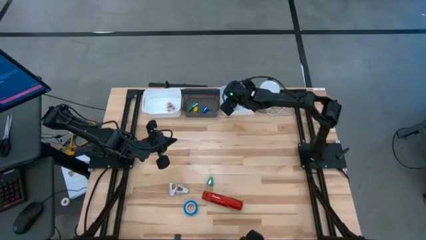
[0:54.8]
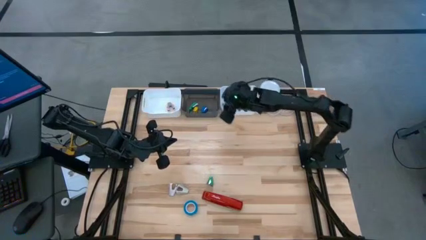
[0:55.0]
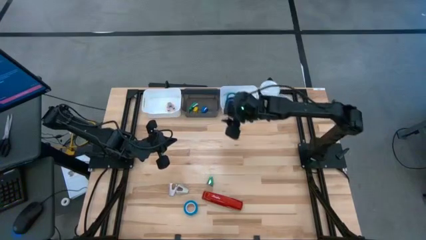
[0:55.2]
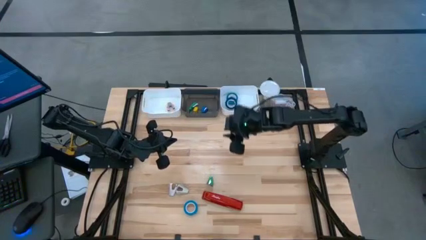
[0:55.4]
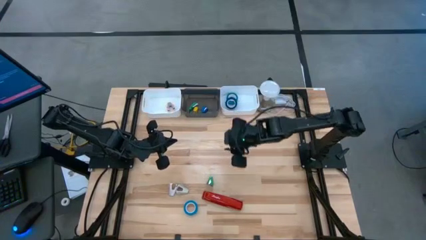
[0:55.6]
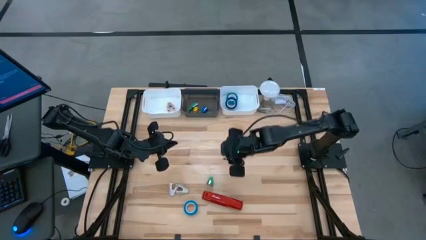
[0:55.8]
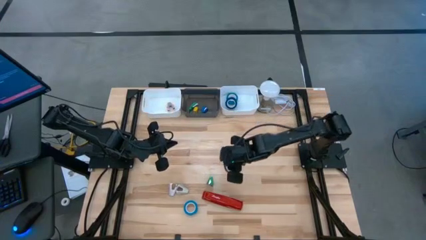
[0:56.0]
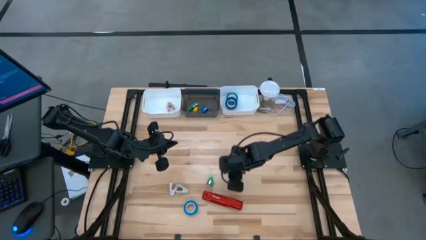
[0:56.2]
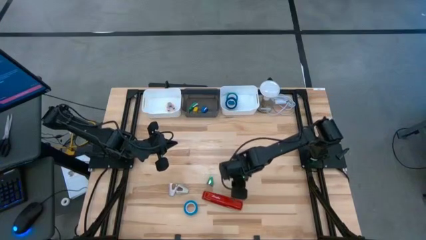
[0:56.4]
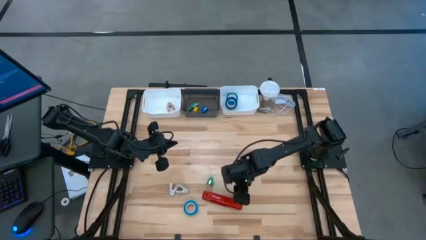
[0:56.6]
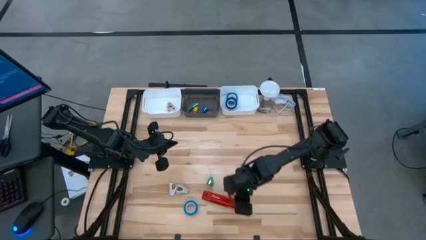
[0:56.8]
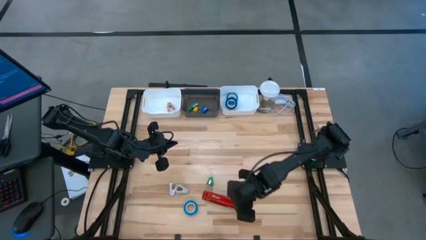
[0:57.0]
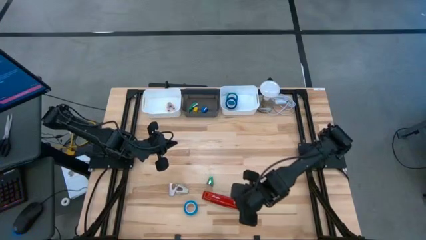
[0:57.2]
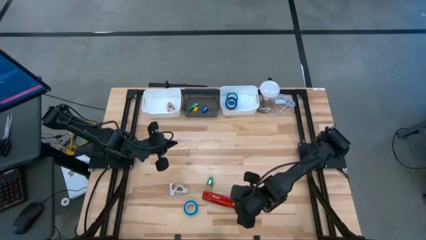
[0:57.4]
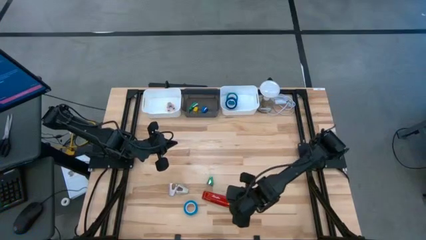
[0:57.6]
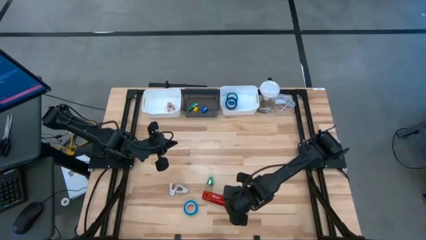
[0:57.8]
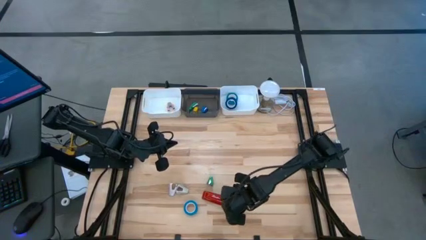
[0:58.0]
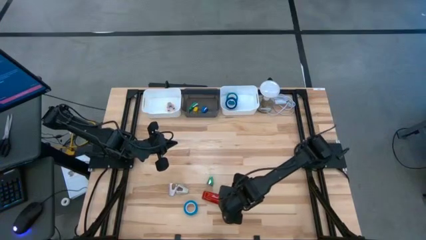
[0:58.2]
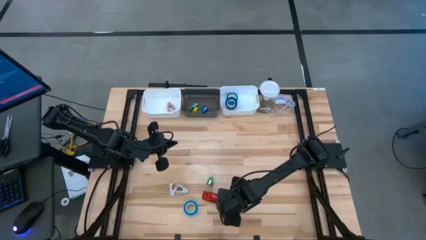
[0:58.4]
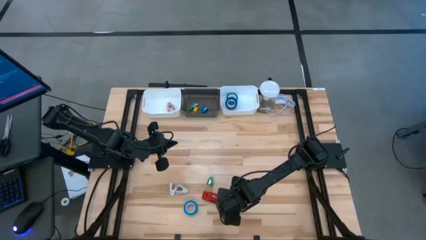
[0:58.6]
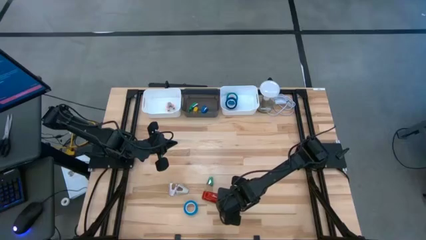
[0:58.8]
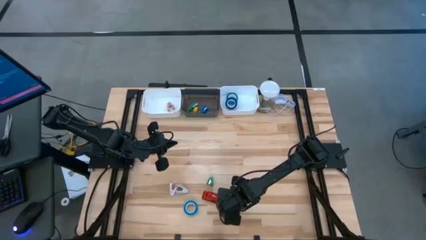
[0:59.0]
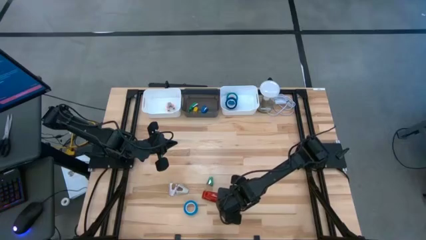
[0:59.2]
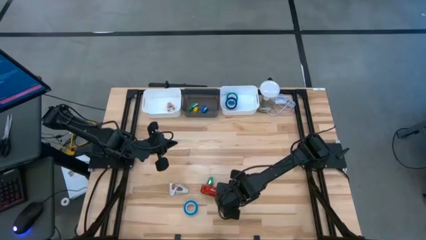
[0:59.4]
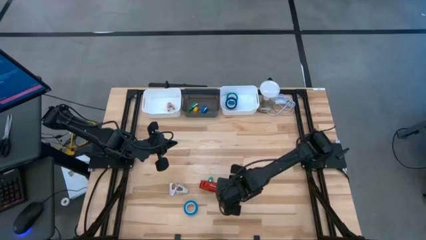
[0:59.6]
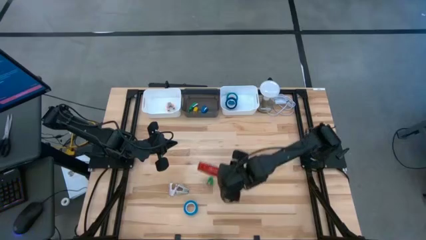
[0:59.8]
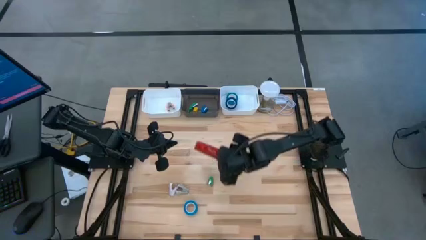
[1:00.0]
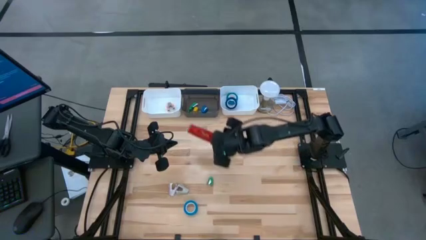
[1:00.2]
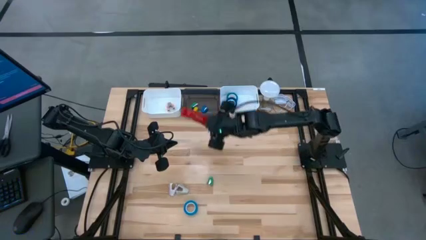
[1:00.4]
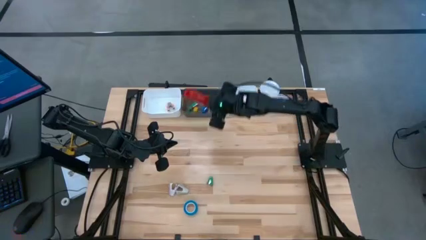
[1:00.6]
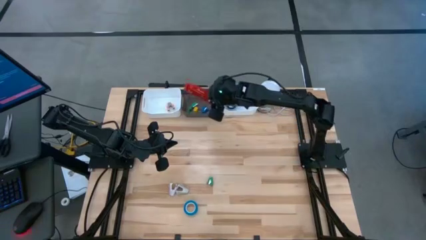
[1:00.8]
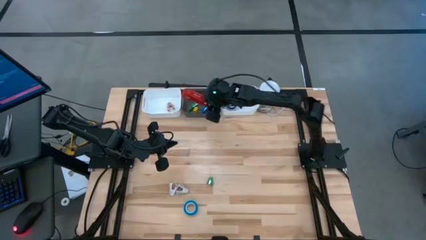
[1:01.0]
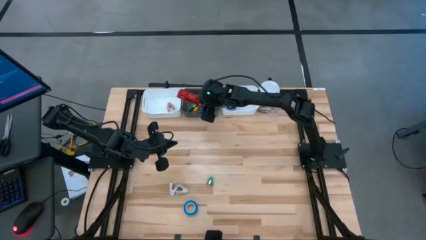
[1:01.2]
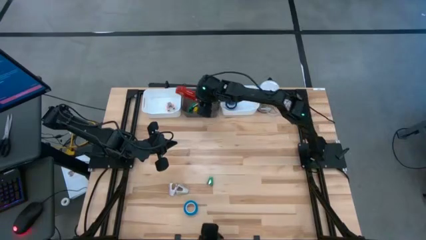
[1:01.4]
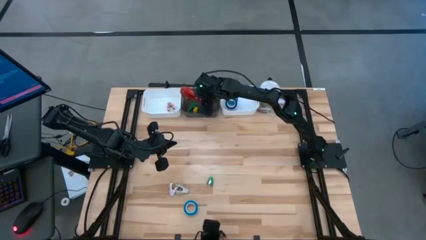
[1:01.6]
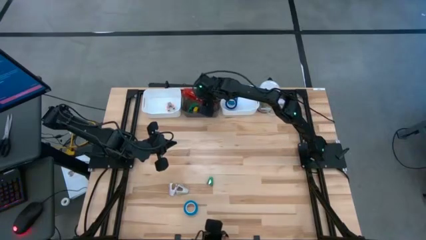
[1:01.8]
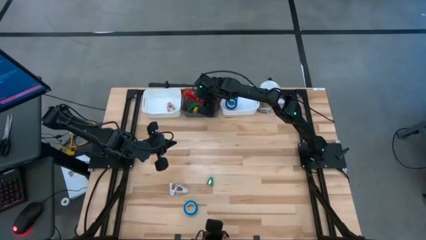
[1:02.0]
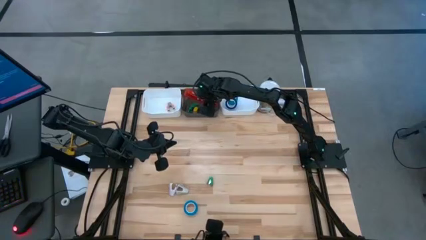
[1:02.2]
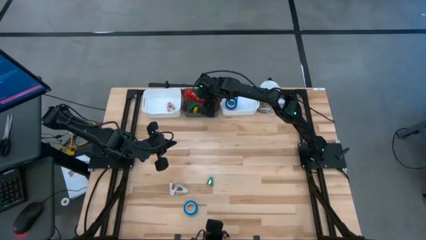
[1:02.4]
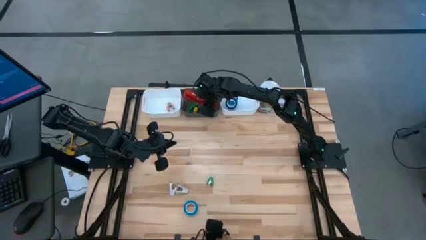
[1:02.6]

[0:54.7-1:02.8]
Task: Pick and place Stapler, Stapler remover, tape
Put the red stapler into the black bin

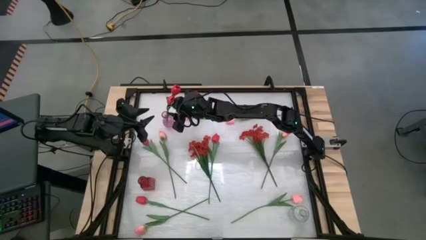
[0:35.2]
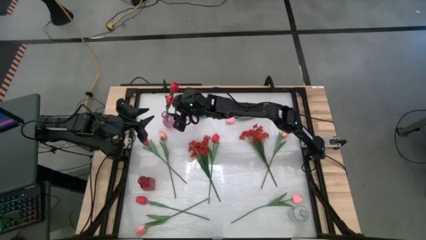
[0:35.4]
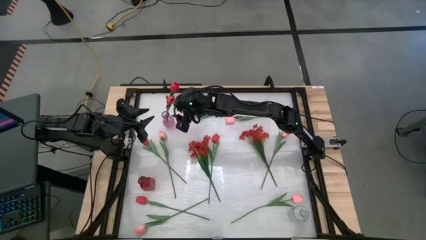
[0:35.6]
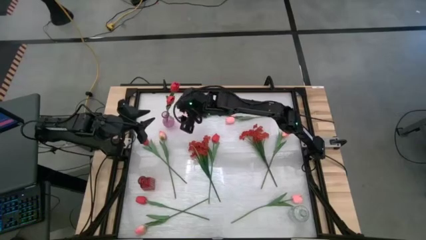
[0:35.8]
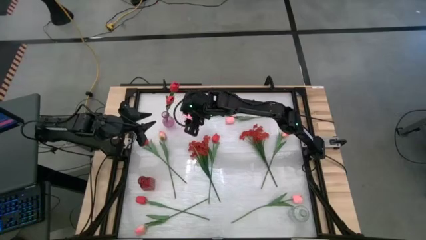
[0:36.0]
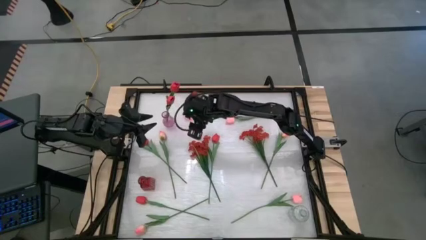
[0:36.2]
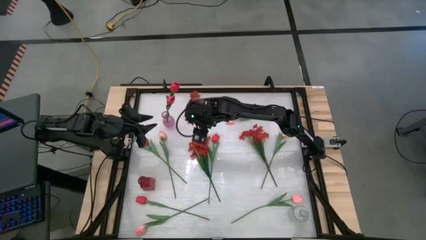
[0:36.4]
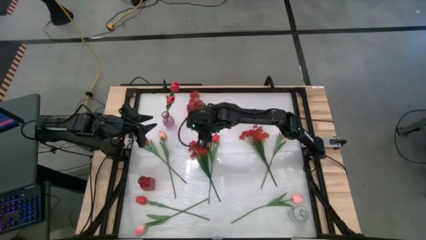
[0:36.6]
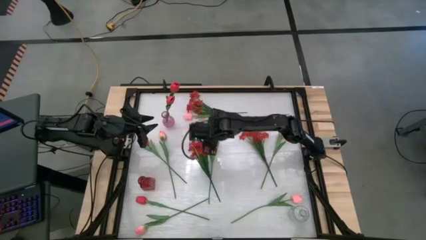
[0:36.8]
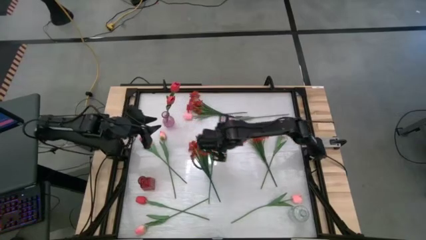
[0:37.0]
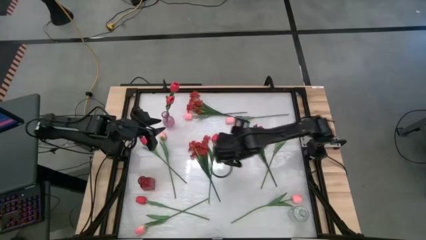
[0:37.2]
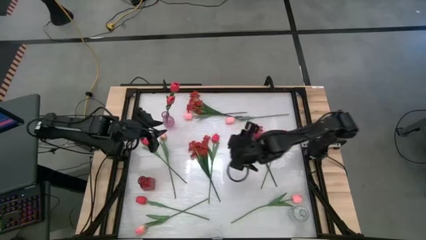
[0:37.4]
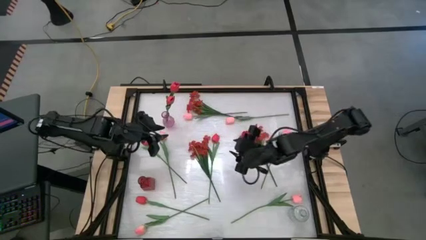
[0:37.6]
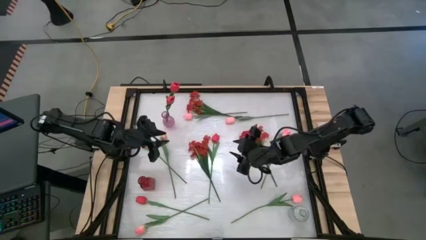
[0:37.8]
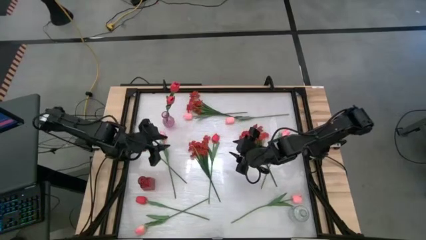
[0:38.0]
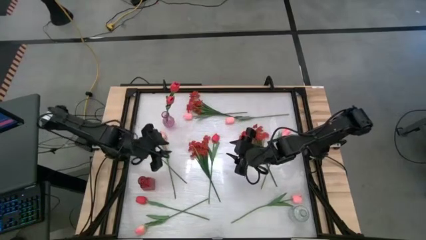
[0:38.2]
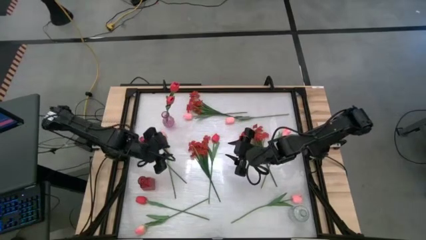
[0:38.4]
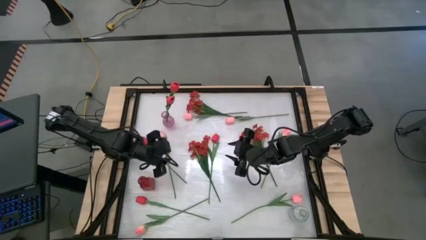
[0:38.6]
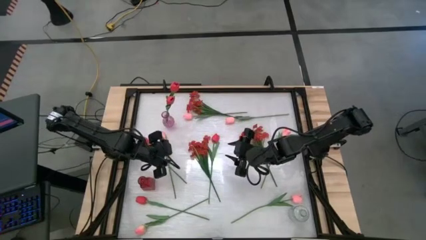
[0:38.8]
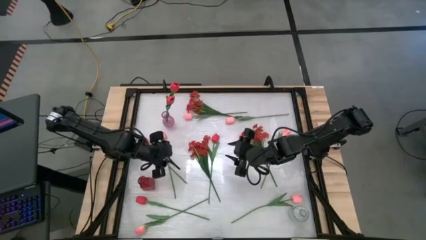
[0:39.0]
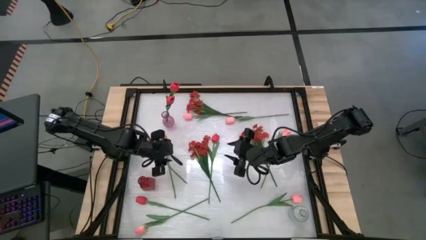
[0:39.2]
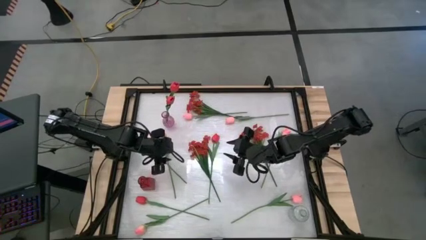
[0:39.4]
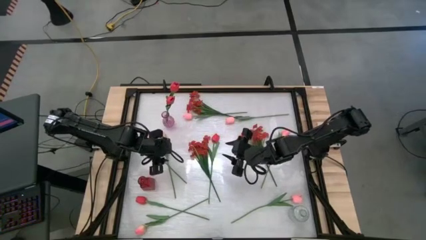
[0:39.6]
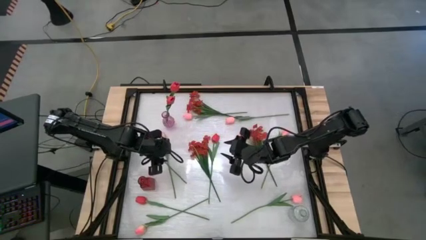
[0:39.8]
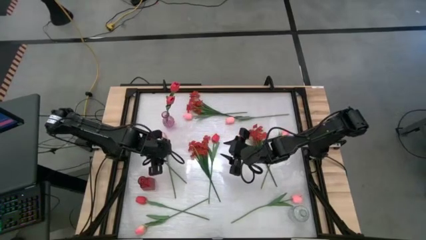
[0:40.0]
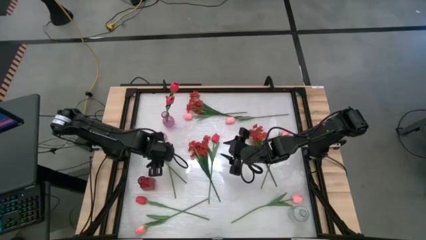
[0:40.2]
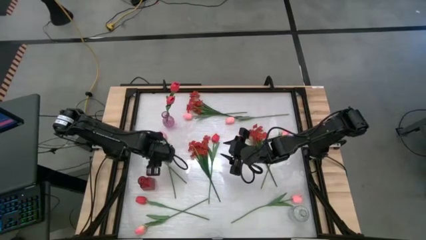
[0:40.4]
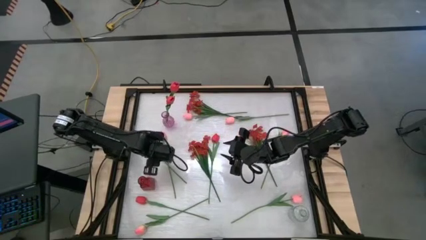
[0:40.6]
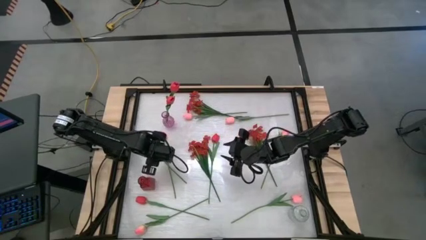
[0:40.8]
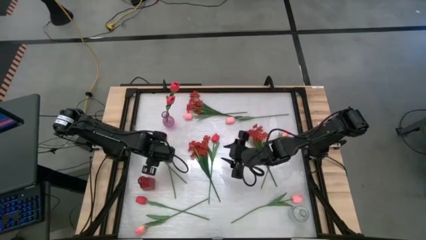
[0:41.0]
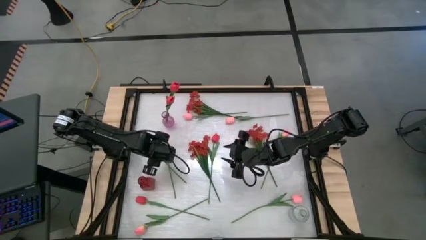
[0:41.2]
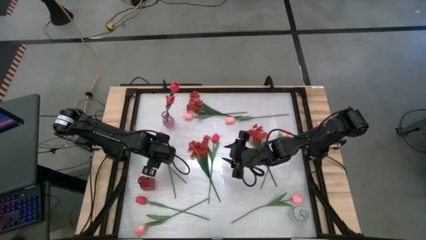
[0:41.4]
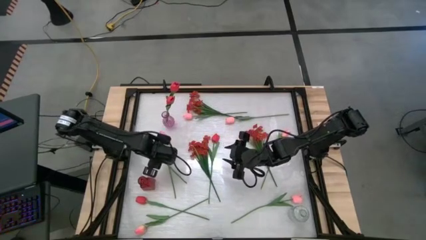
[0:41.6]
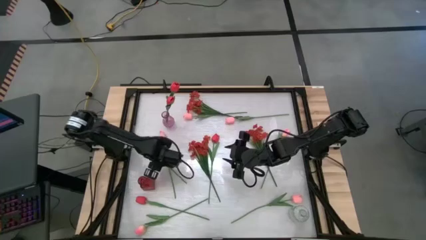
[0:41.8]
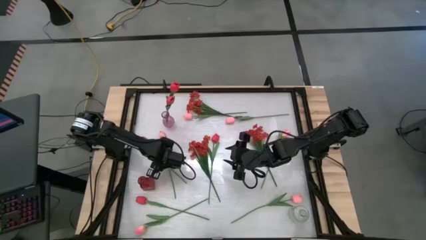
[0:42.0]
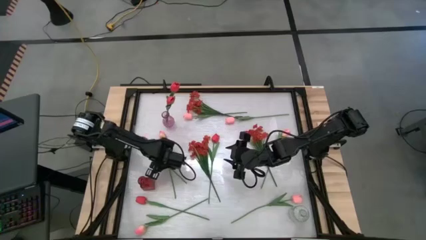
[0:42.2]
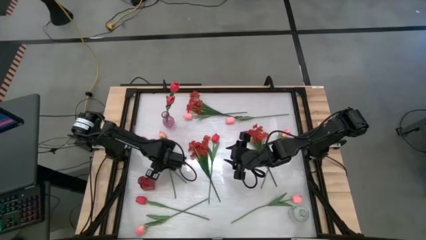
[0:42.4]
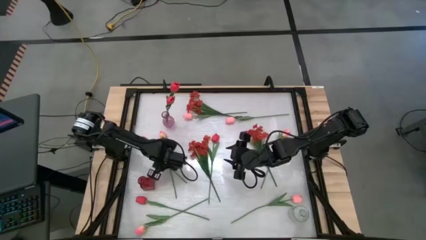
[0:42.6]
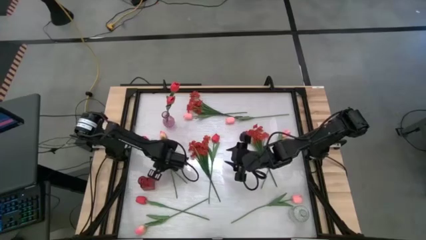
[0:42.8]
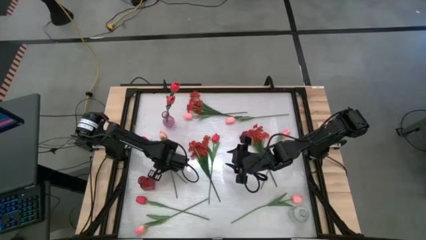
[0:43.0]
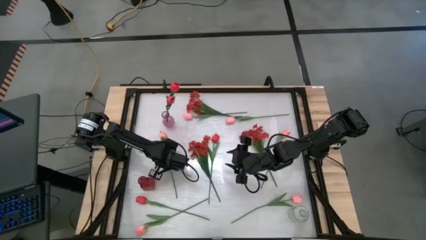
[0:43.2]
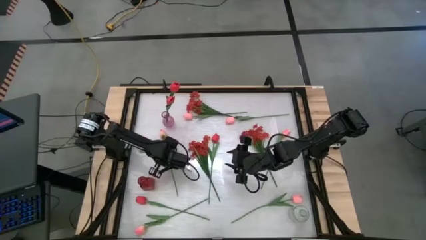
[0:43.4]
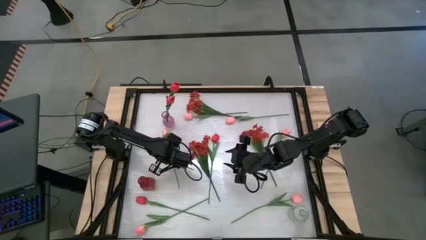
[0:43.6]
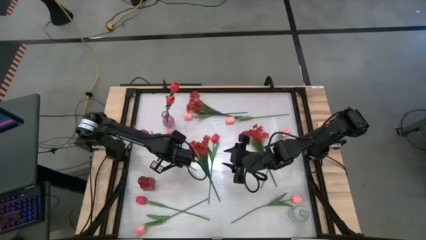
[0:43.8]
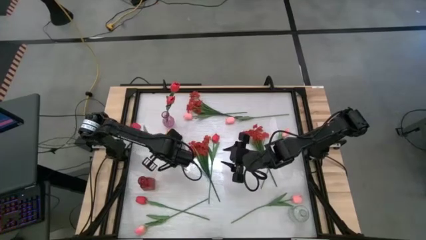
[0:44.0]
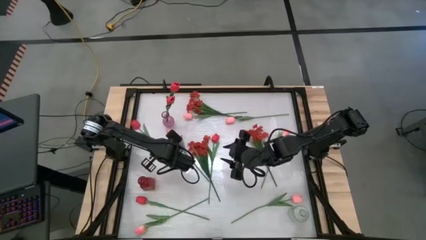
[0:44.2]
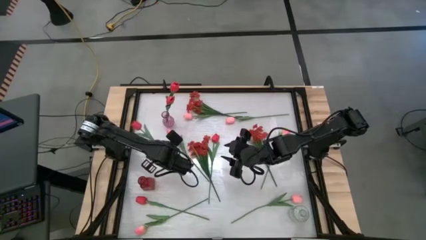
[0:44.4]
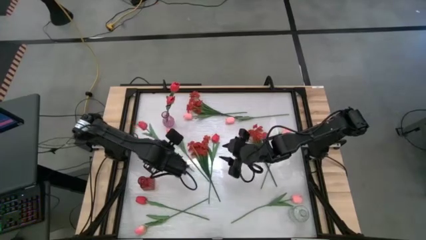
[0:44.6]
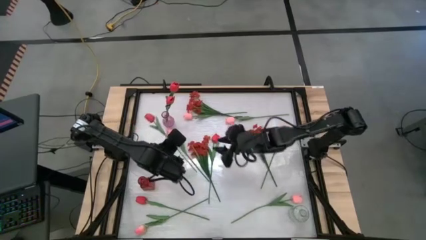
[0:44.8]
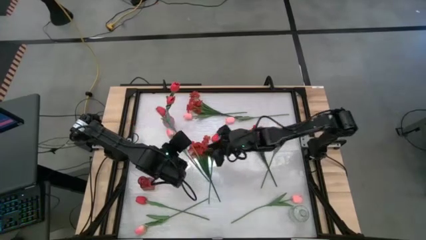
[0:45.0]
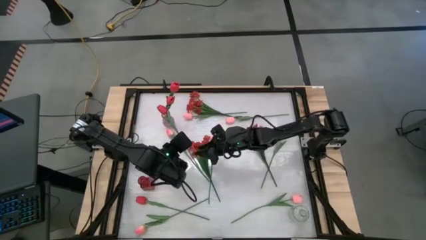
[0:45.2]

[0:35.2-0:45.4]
Task: Sort flowers into vase by color
Put the red tulip into the purple vase
